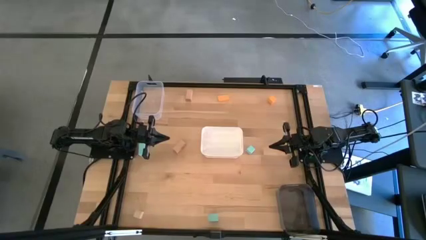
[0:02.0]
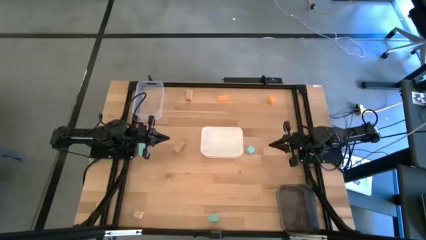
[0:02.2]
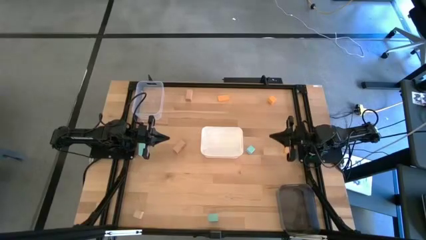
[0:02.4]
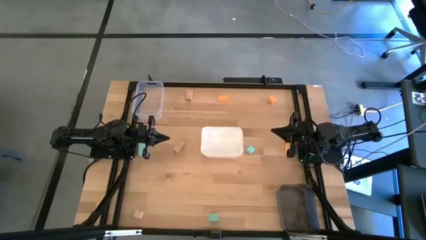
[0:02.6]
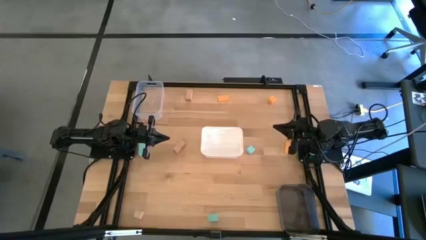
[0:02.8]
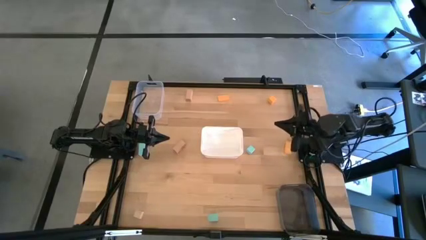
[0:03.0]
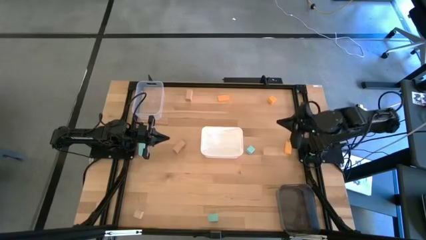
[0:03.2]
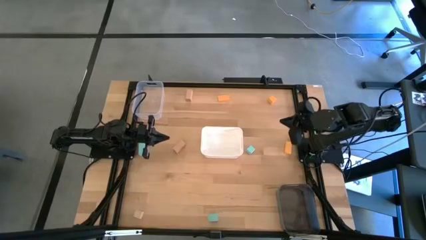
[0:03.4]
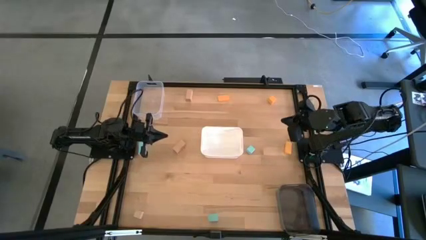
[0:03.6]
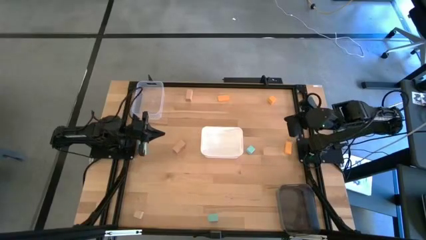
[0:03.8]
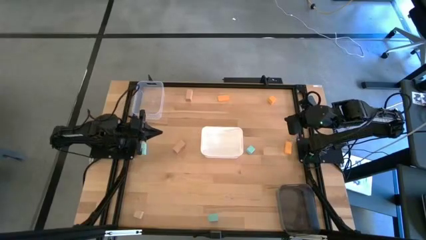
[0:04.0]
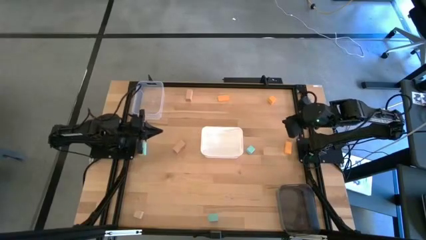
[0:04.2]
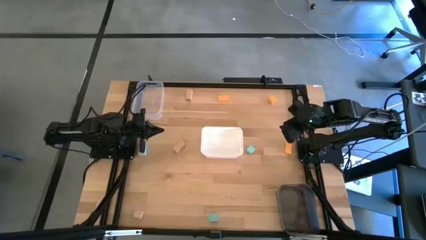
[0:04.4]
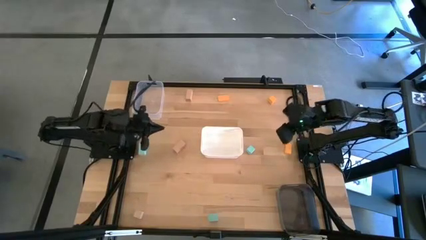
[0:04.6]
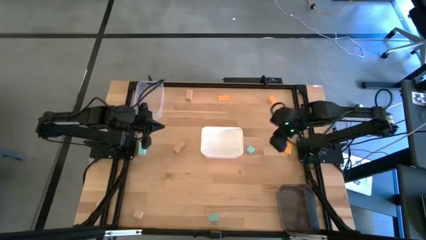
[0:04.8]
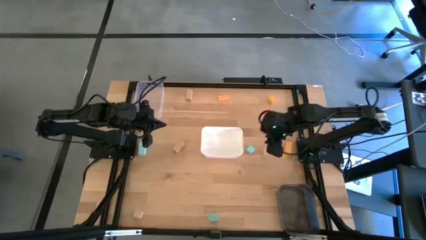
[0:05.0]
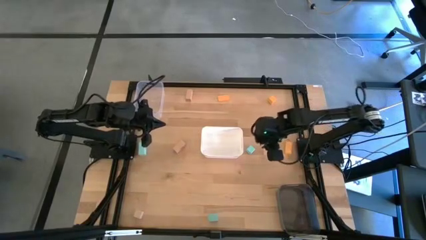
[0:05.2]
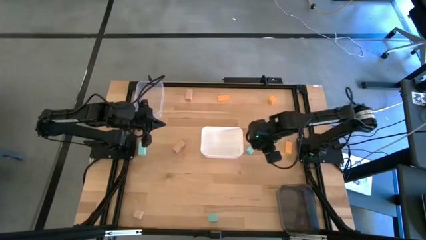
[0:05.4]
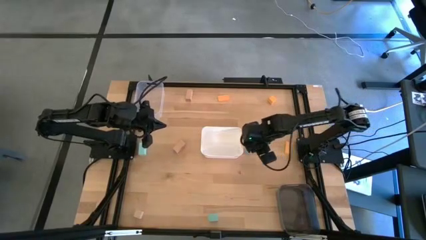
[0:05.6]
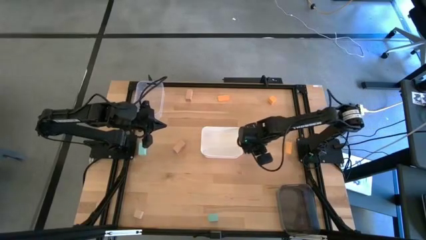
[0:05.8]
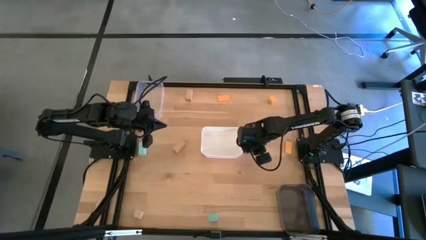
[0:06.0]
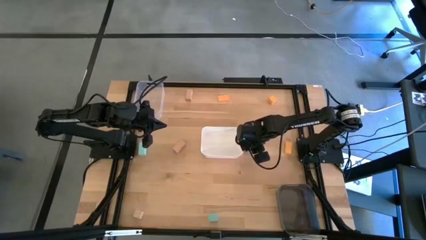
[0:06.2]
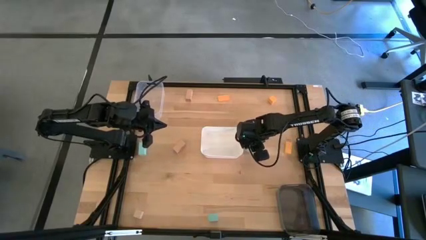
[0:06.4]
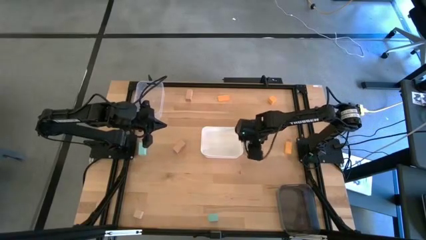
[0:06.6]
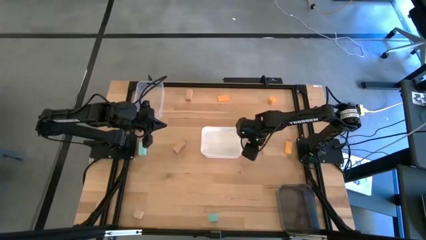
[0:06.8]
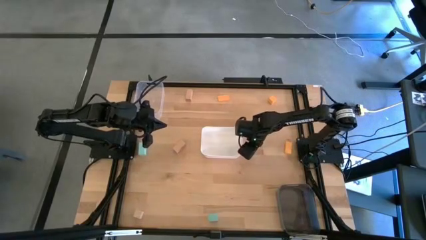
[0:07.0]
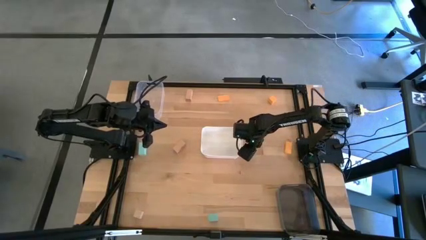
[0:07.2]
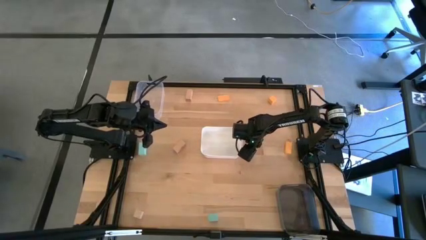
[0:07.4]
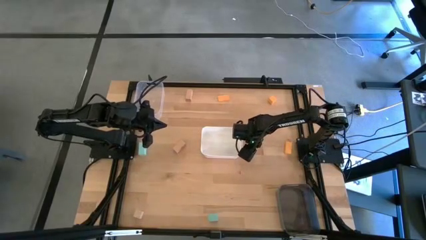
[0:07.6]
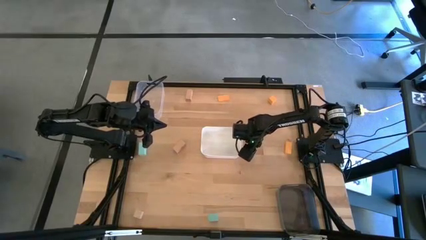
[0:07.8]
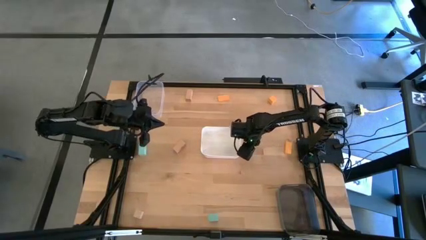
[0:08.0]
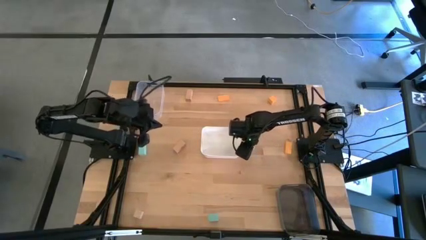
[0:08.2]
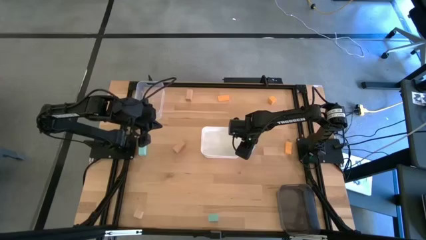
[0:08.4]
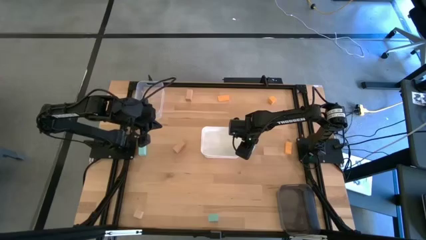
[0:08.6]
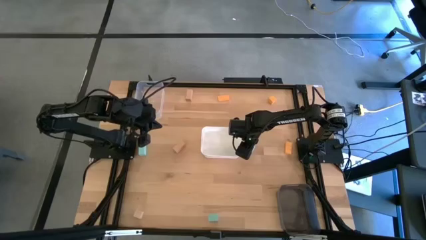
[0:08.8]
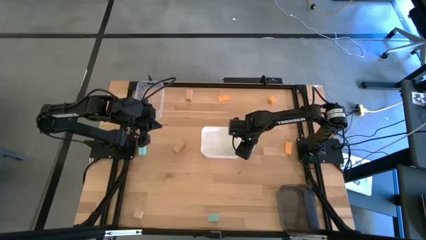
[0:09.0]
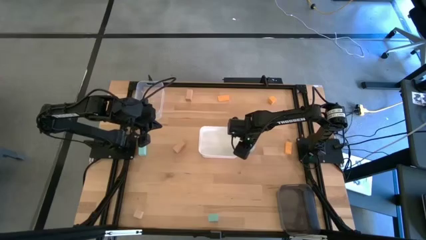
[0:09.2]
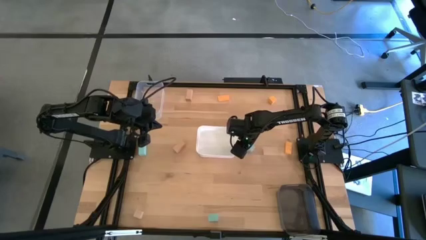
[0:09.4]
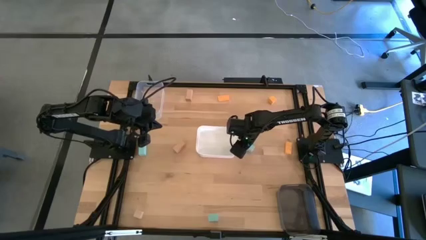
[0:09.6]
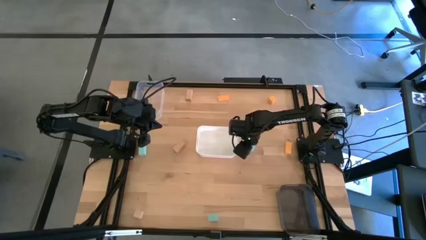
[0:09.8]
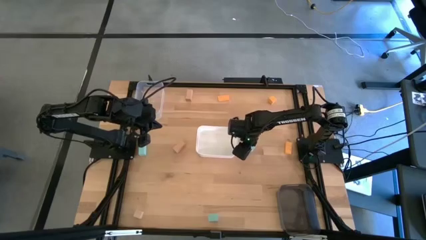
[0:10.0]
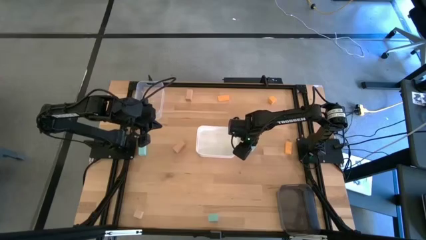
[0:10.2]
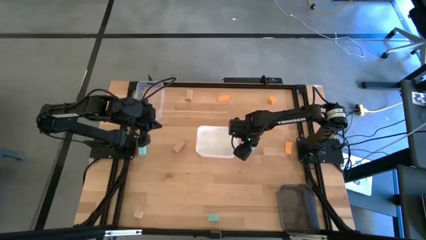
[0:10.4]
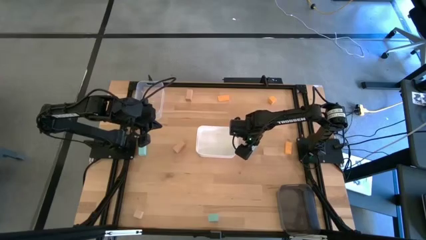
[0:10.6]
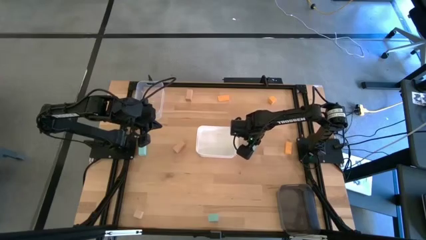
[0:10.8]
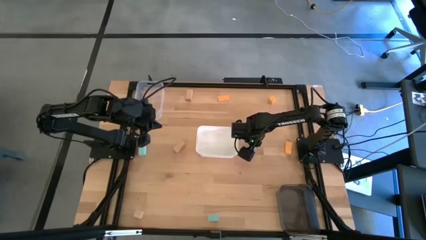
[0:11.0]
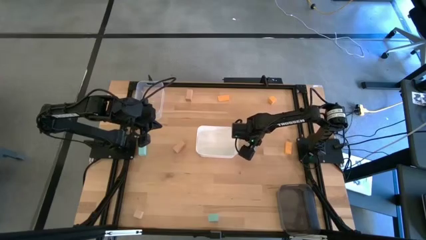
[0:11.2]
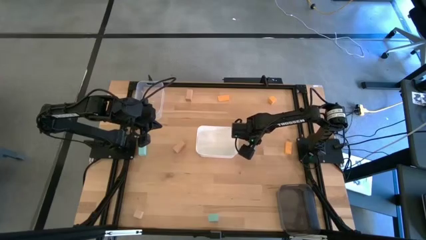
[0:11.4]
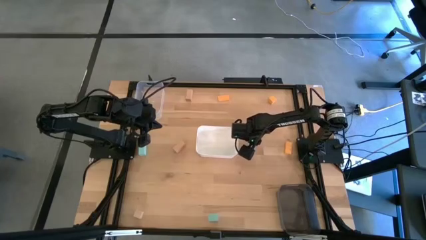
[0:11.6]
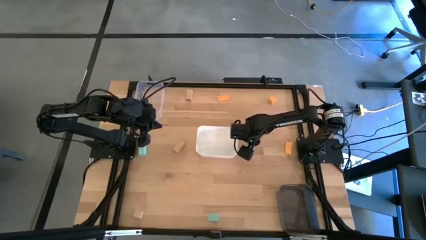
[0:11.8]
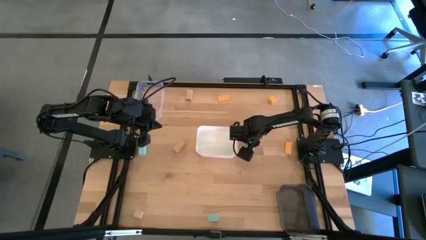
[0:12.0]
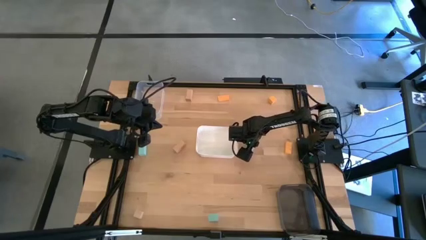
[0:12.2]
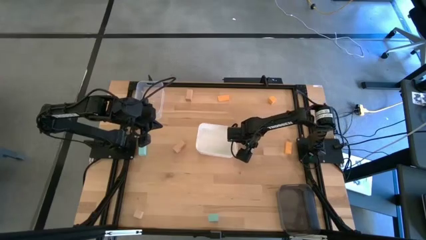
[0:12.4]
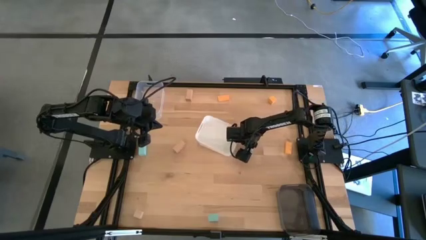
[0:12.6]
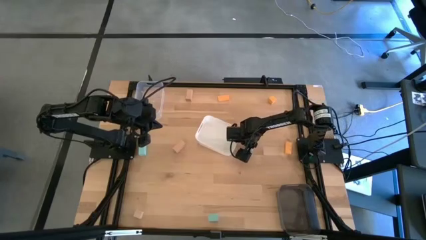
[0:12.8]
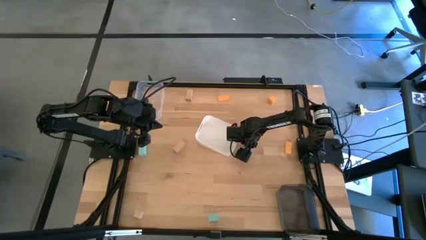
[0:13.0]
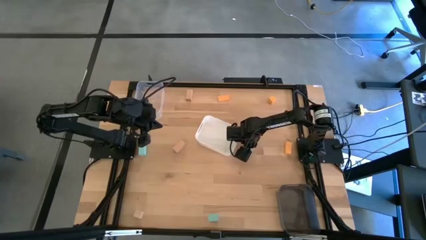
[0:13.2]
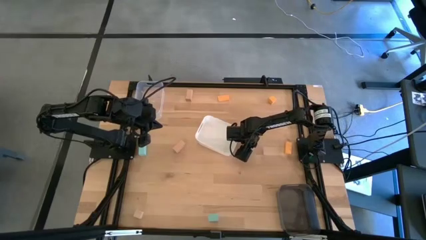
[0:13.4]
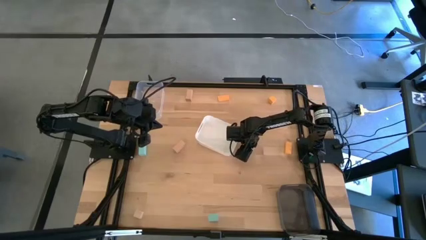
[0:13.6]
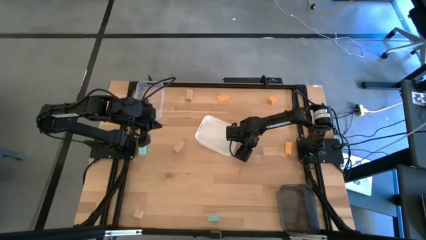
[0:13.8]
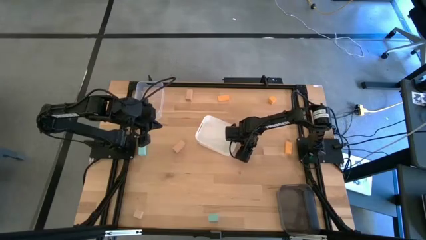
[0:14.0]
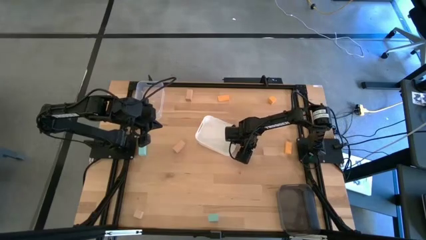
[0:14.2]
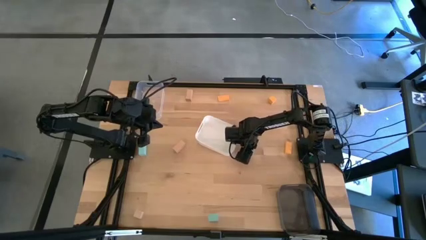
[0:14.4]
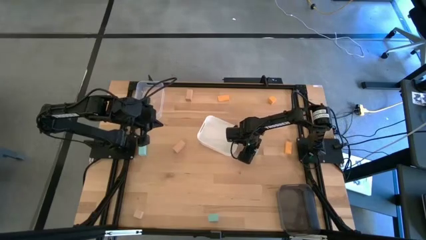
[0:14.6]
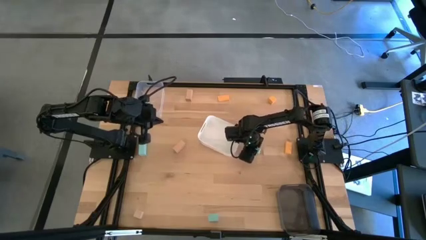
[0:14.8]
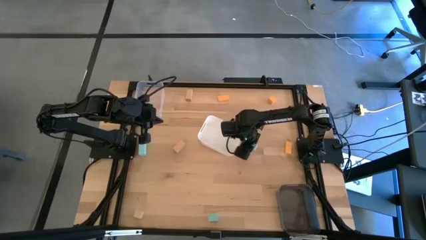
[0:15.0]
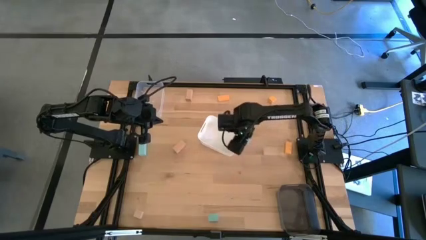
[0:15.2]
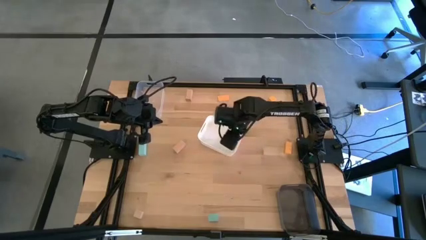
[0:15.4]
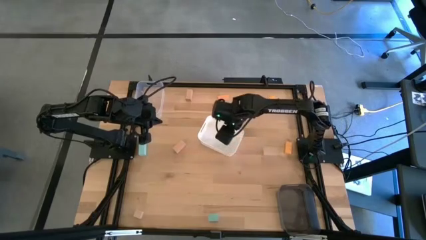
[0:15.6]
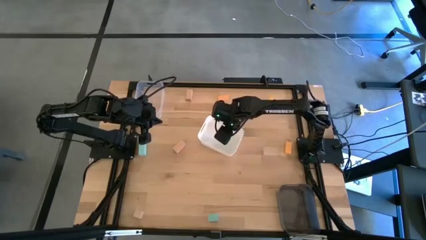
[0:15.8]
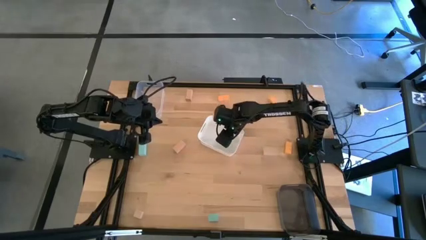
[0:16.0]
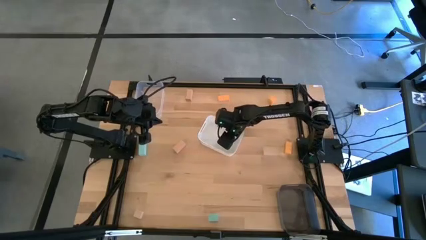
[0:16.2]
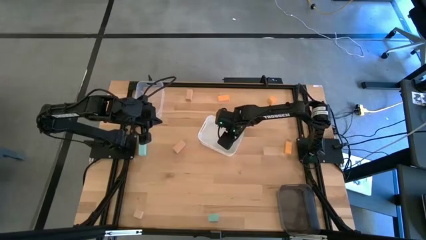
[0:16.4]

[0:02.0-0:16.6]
Task: Sort & place blocks by color
Put the top right light blue block into the white bin

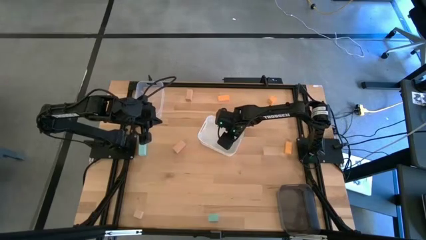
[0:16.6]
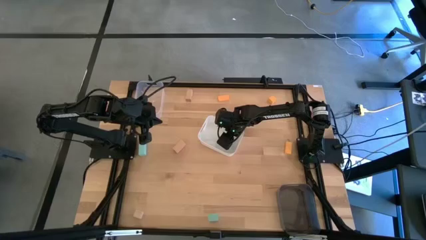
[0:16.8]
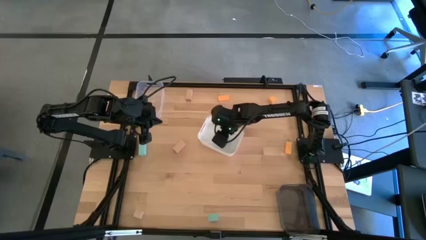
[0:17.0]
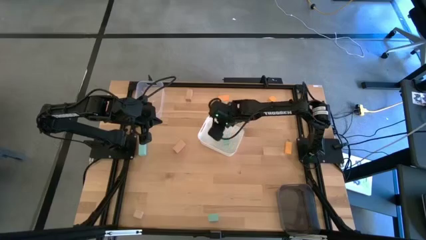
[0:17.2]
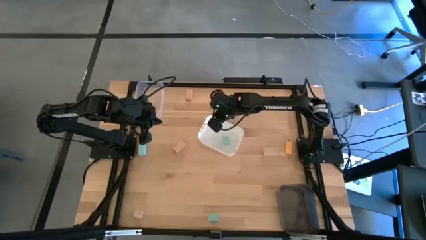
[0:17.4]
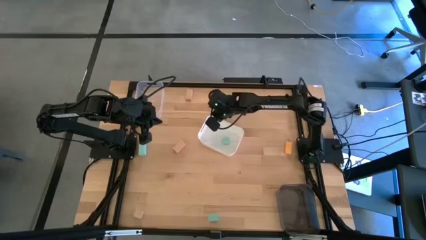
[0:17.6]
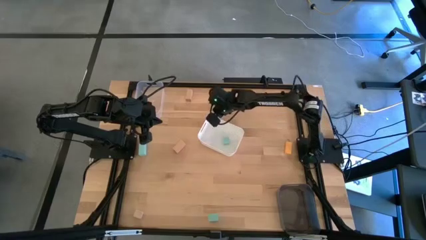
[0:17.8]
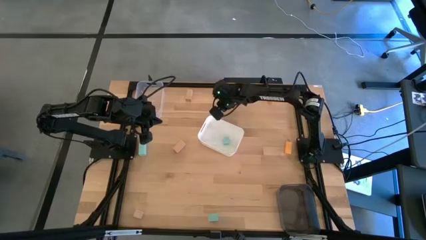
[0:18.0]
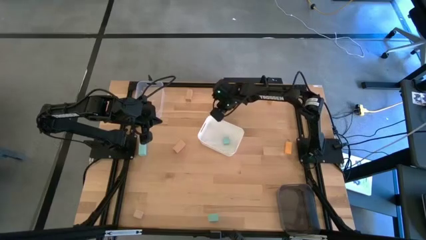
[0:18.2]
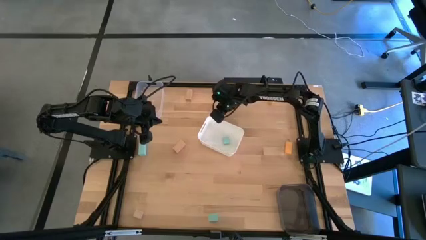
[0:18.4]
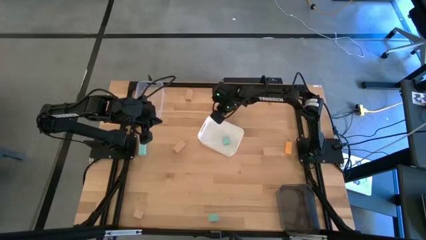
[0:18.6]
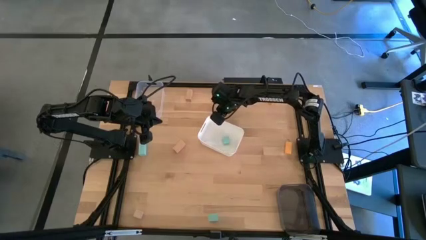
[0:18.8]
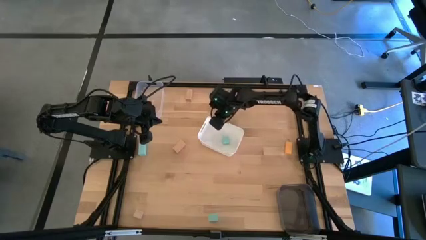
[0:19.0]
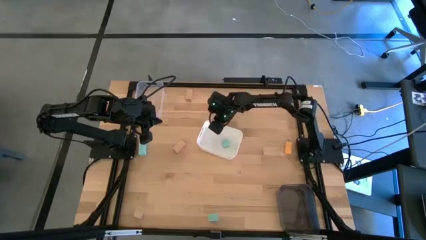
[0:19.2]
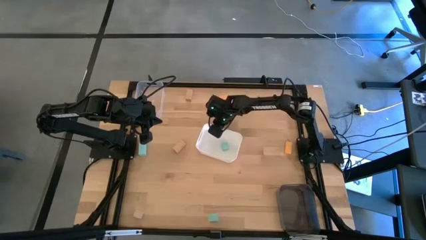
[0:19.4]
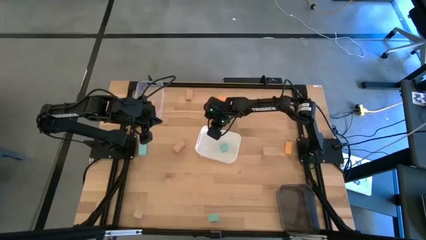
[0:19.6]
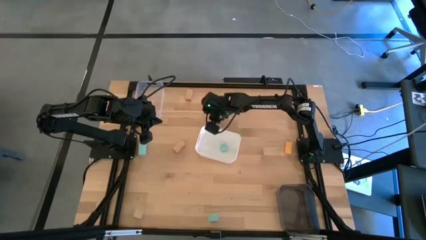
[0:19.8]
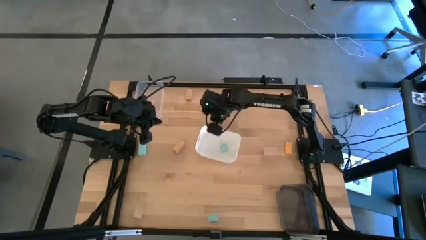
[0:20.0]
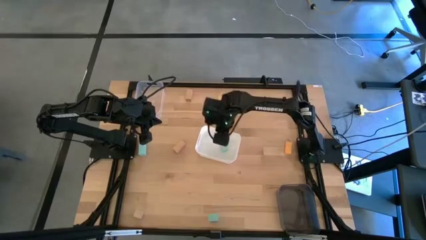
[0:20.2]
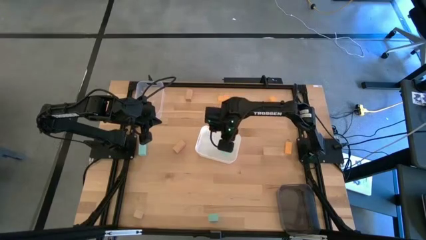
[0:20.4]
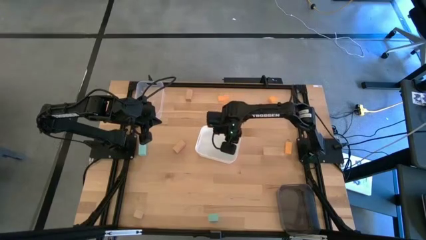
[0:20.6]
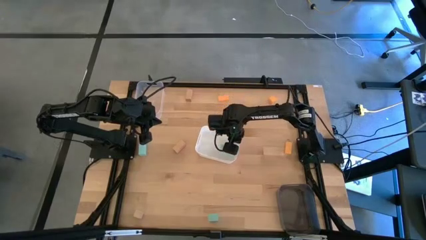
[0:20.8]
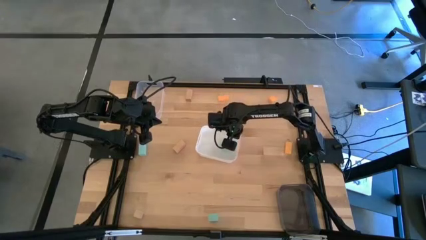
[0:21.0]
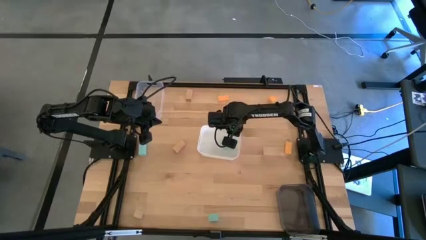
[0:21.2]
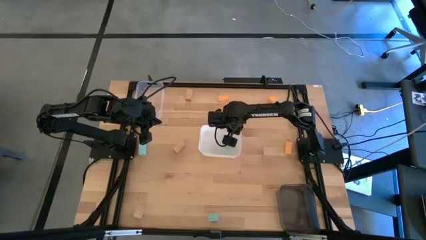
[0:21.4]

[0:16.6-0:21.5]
Adjust the white bin
